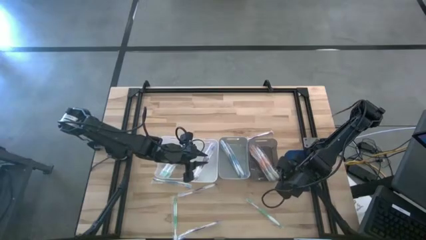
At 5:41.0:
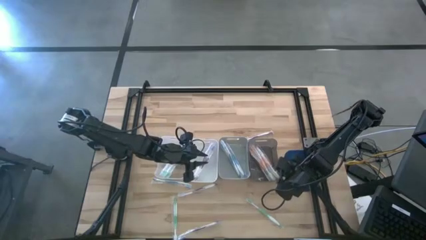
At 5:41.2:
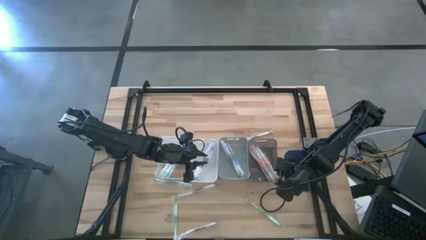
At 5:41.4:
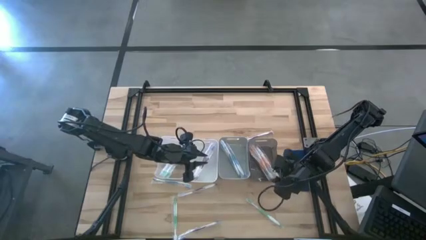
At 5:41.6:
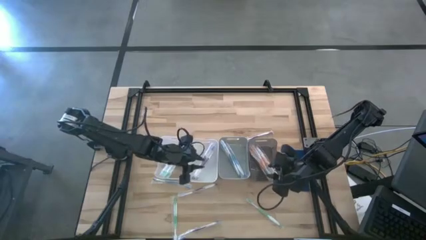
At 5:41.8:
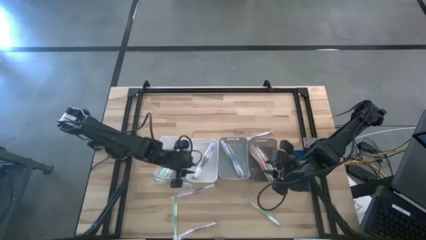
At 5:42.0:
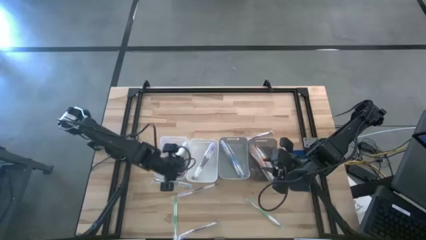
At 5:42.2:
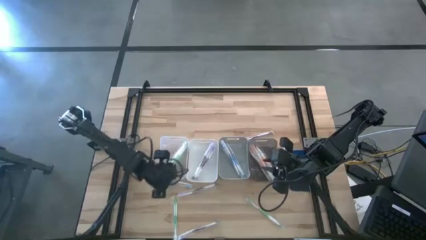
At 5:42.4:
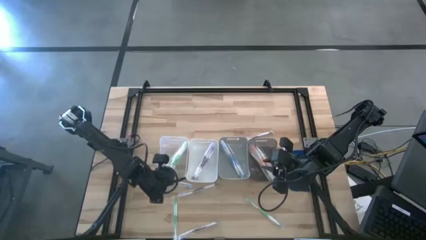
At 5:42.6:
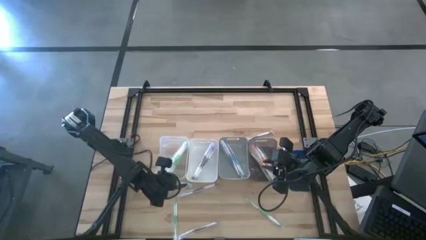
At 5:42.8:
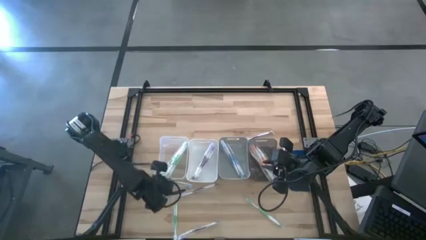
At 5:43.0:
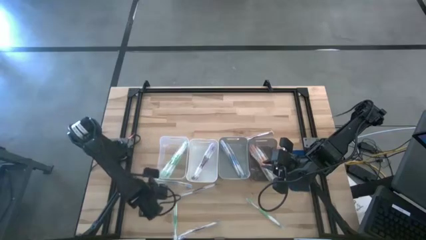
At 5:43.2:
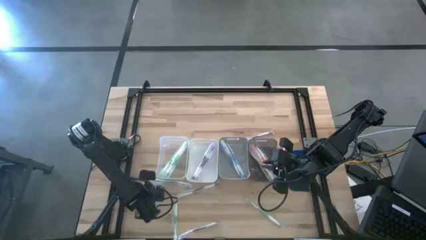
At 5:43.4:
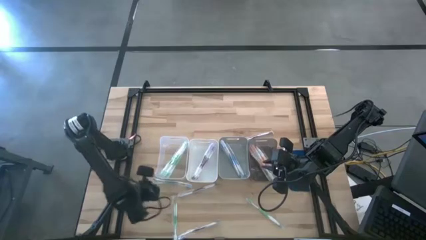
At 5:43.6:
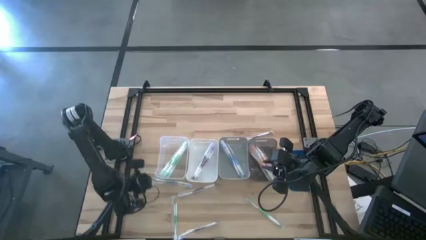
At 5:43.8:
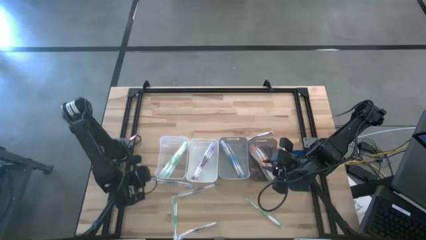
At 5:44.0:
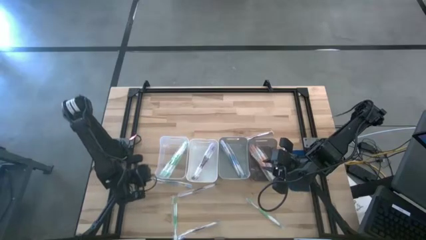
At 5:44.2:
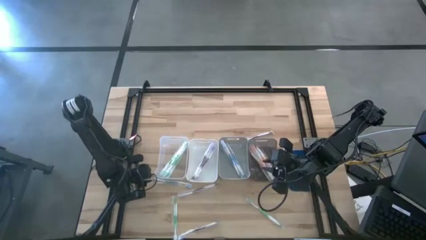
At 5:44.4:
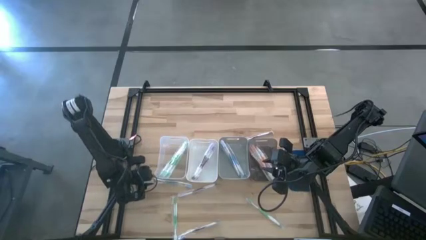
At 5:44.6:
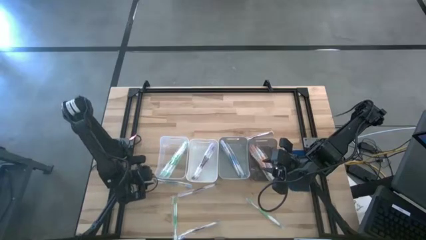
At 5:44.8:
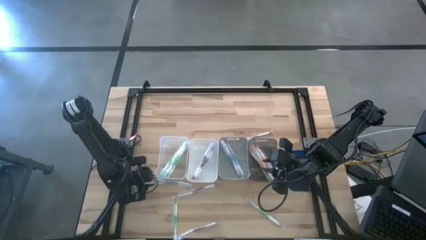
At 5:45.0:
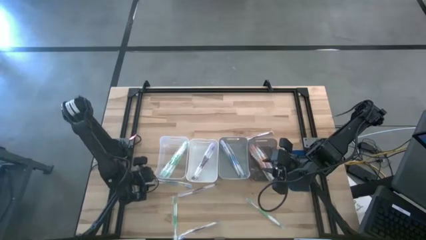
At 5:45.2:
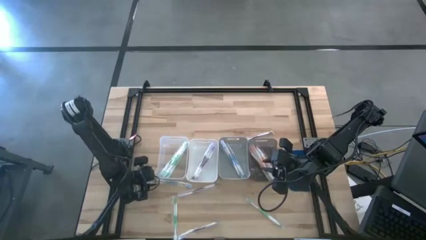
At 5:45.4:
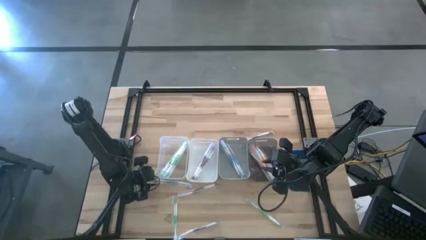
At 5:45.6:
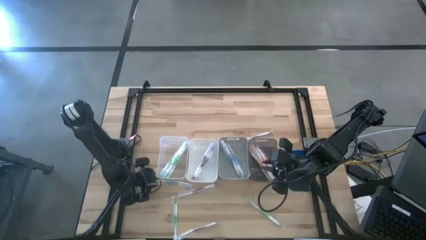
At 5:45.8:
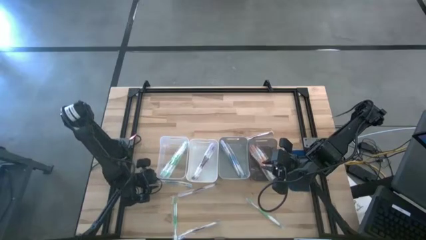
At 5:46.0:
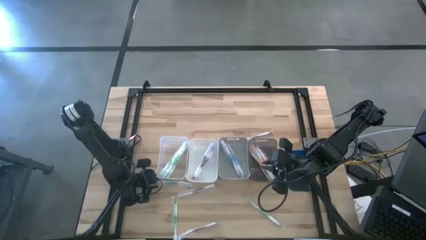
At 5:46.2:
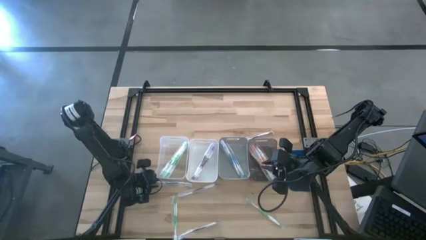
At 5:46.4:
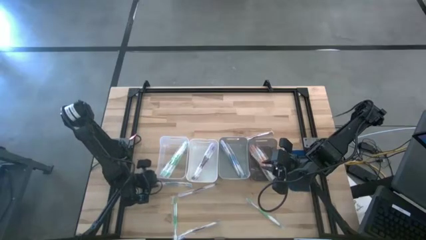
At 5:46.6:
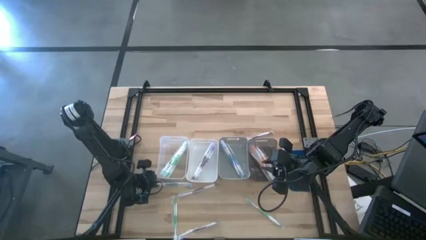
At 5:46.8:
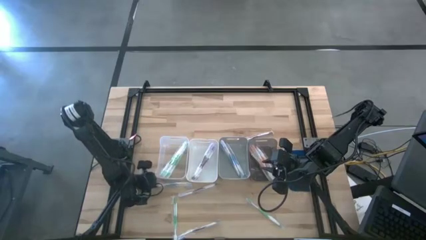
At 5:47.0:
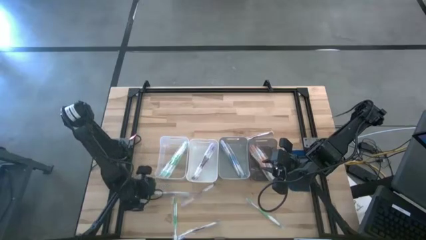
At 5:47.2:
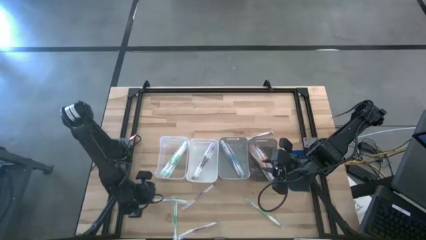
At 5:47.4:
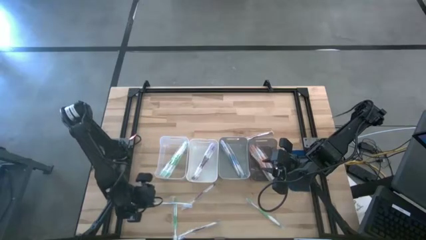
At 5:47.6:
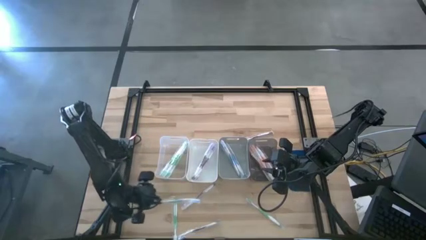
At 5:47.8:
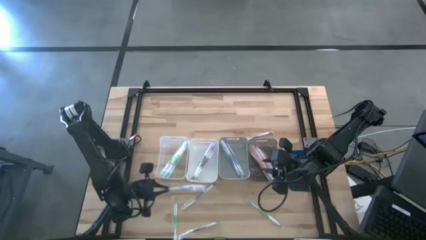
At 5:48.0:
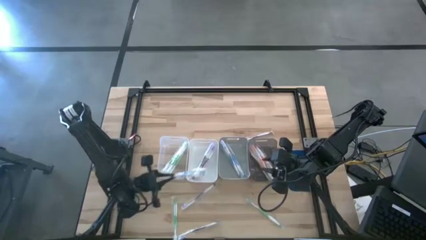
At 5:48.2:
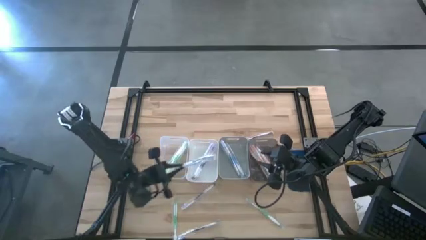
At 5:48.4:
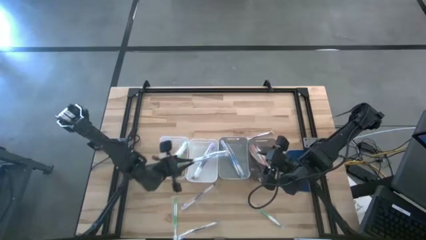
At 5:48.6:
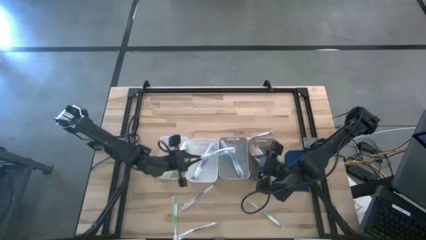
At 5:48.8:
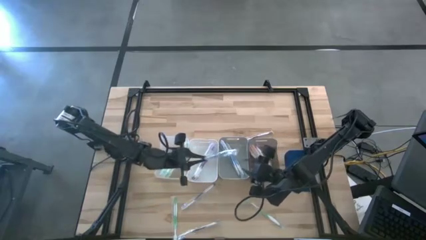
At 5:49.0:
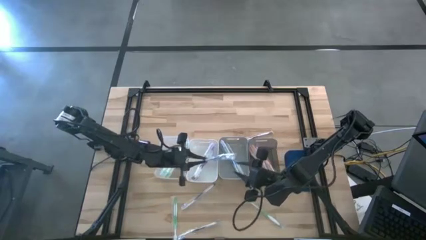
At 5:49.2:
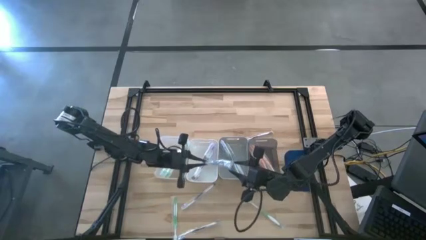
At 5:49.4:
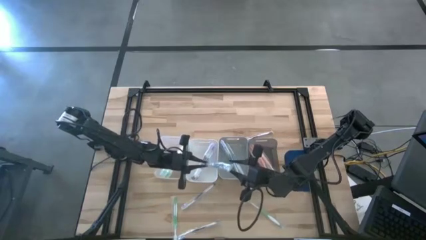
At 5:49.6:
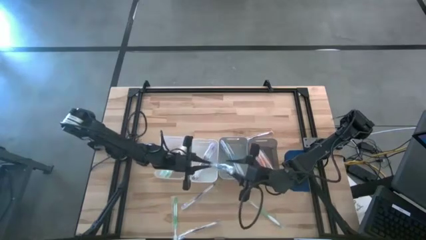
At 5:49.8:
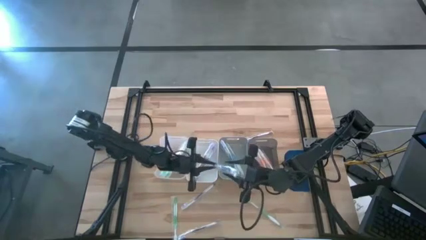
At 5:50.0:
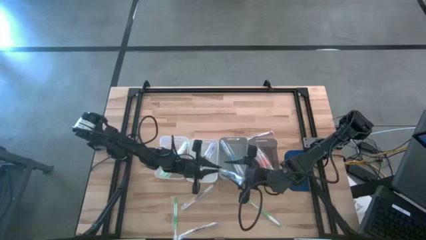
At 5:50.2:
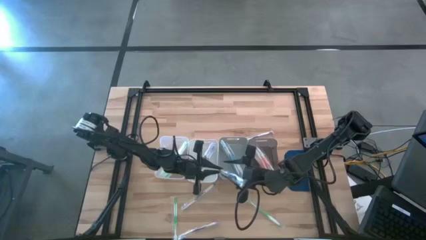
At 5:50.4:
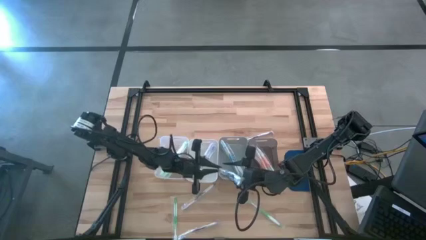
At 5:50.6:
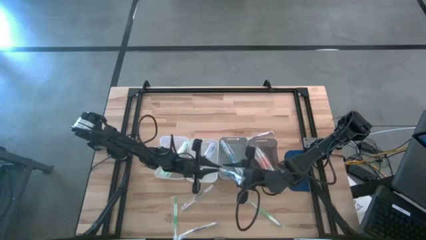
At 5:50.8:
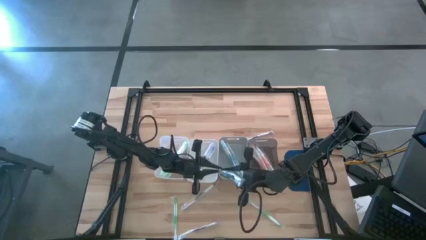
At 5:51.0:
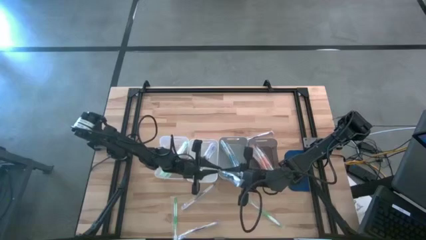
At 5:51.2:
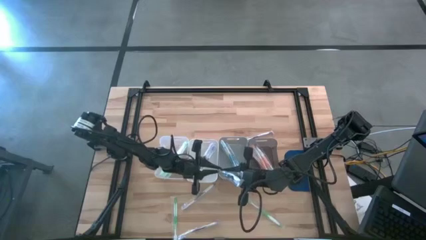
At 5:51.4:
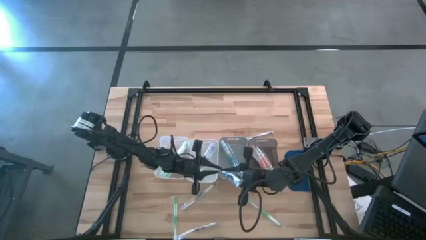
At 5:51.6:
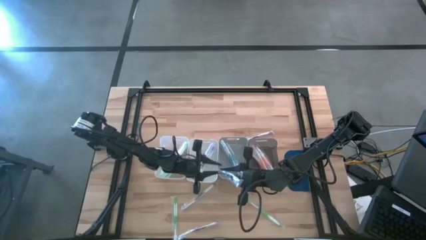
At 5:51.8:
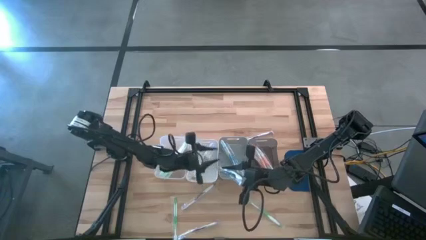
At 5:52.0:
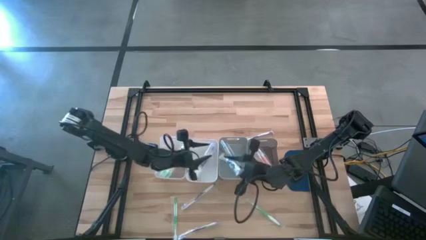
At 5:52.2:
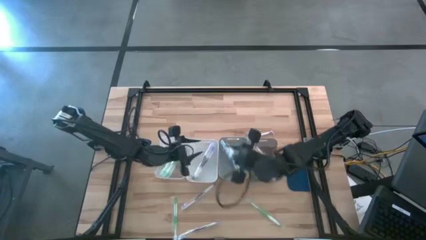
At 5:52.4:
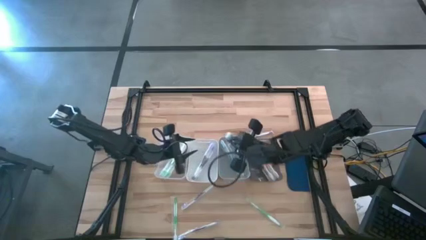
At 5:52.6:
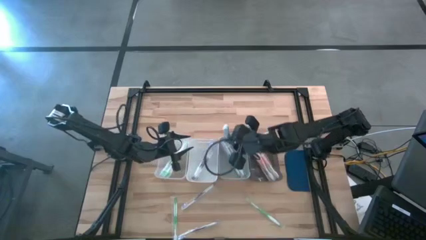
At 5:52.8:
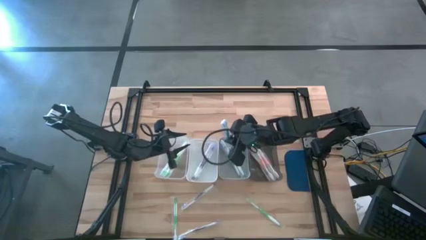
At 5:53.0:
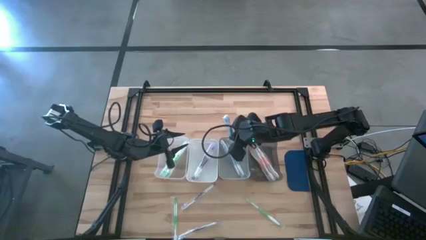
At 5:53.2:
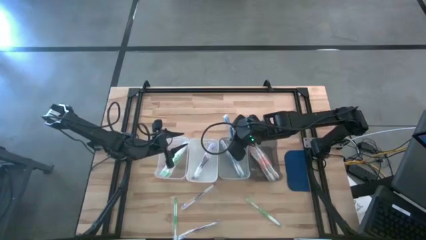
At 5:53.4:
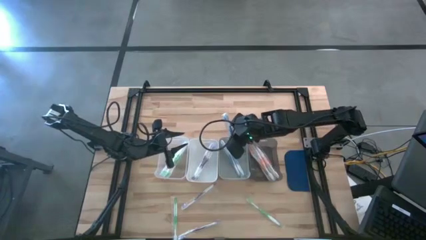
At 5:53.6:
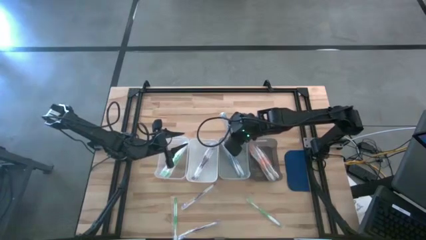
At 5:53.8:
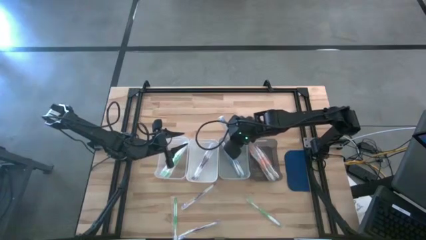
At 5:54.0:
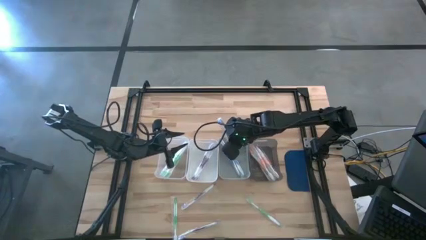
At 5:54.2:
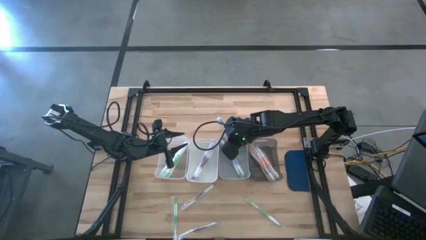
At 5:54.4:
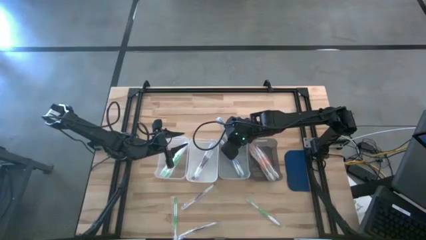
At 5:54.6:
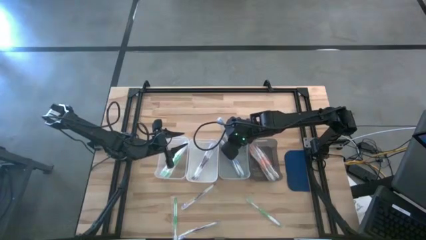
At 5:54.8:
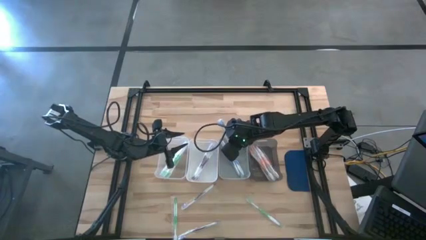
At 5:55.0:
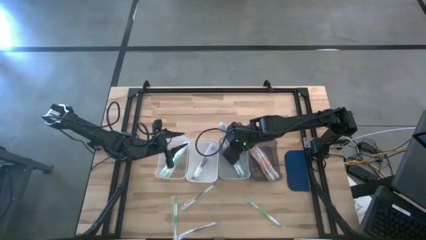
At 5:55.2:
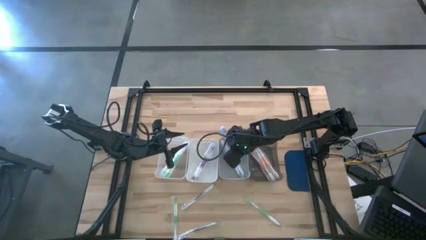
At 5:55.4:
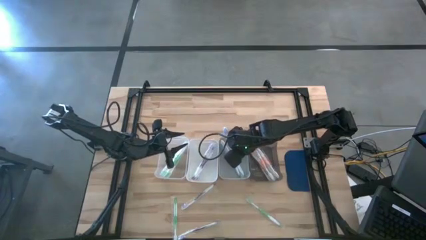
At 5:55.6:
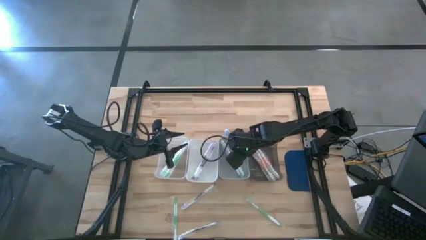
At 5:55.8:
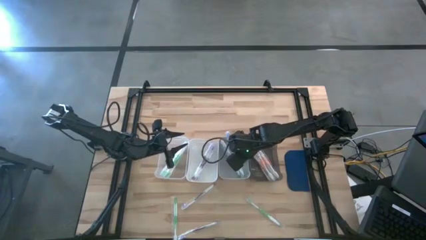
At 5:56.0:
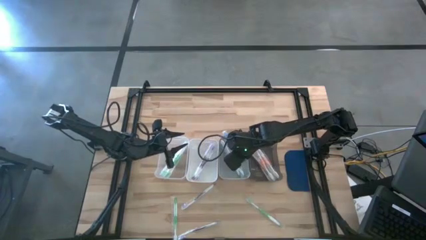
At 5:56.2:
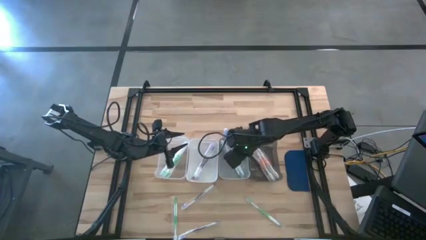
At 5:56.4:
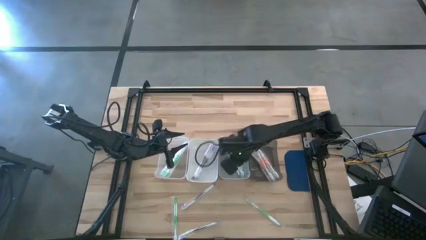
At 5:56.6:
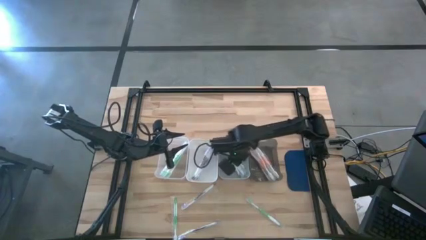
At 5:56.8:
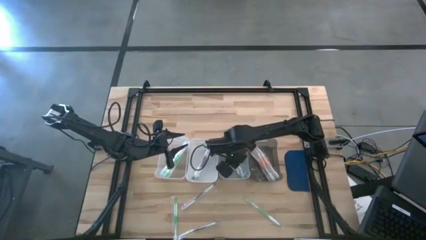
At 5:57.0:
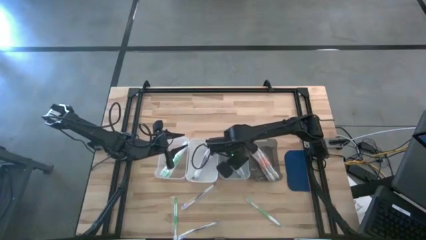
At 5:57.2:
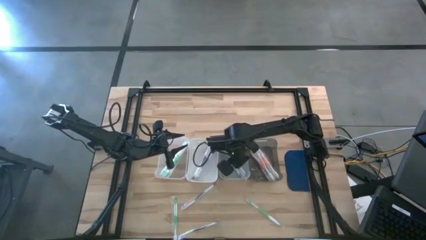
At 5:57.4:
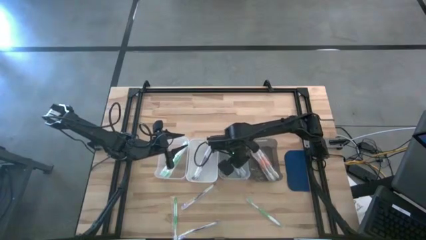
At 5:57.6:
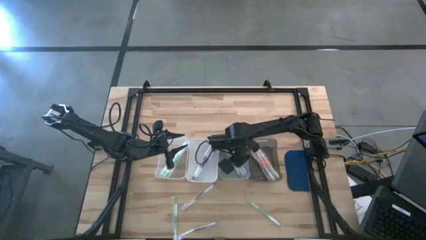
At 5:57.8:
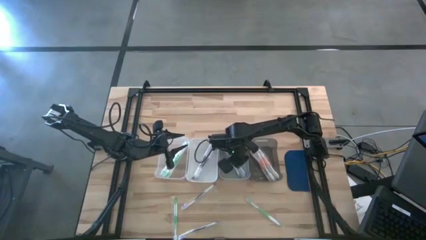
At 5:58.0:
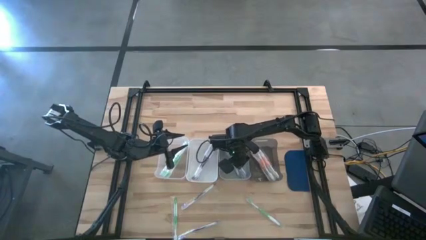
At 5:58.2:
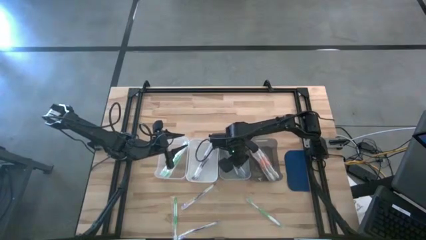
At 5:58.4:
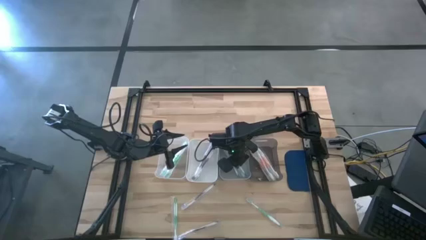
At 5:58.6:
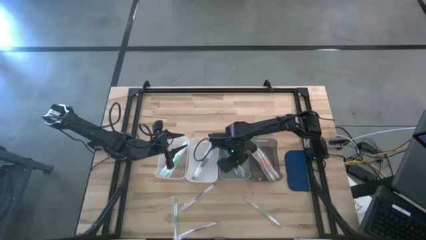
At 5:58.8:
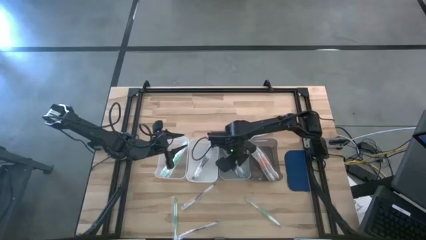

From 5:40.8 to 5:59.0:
Task: Pick & Place Toothbrushes
Put the blue toothbrush into the gray bin
